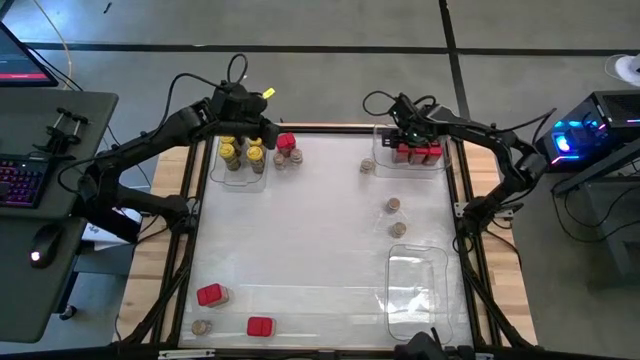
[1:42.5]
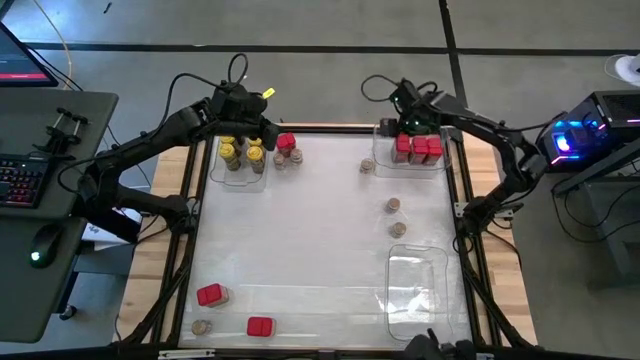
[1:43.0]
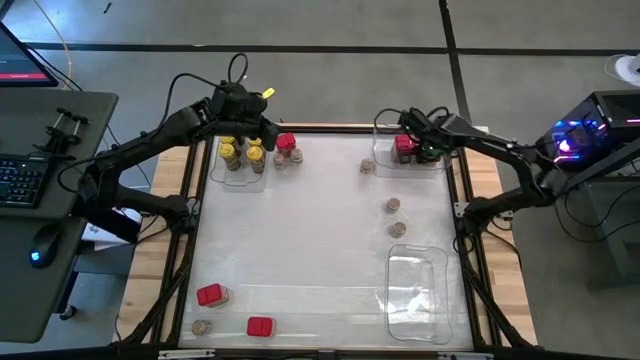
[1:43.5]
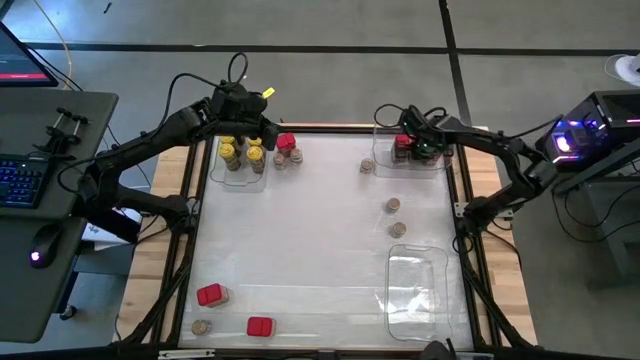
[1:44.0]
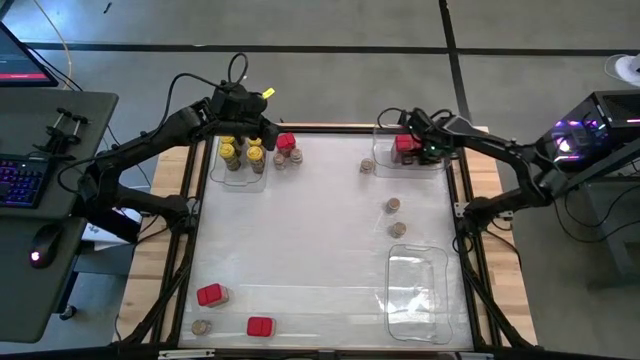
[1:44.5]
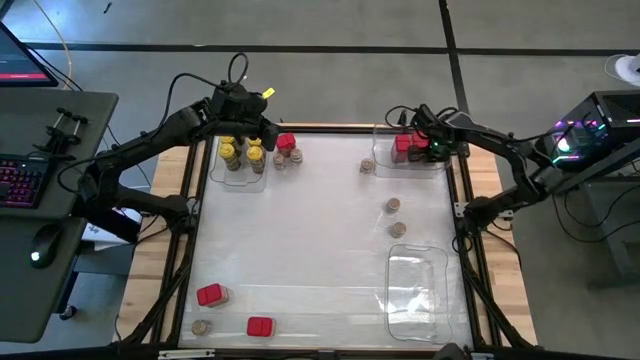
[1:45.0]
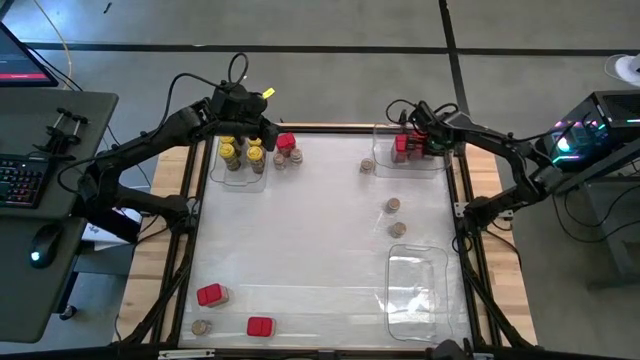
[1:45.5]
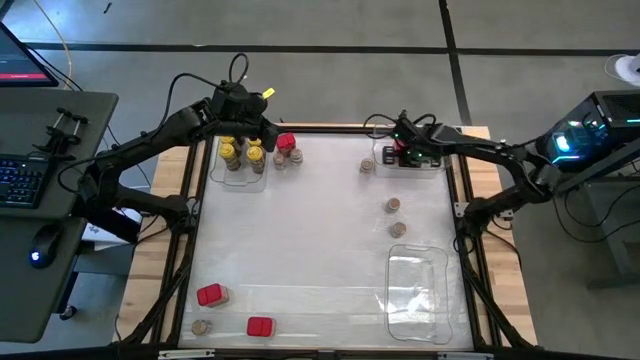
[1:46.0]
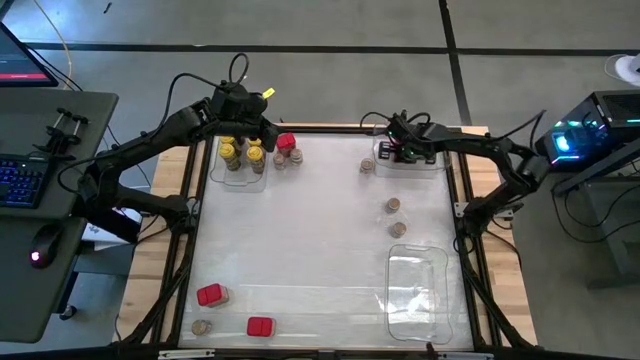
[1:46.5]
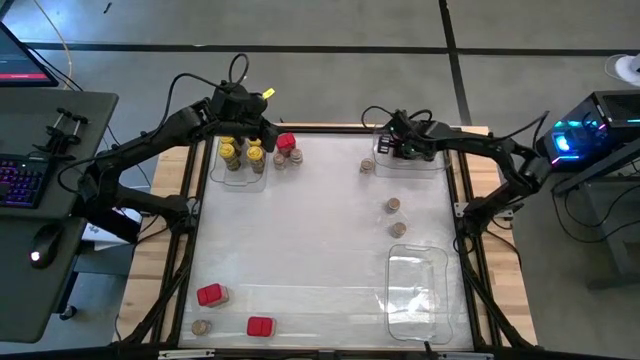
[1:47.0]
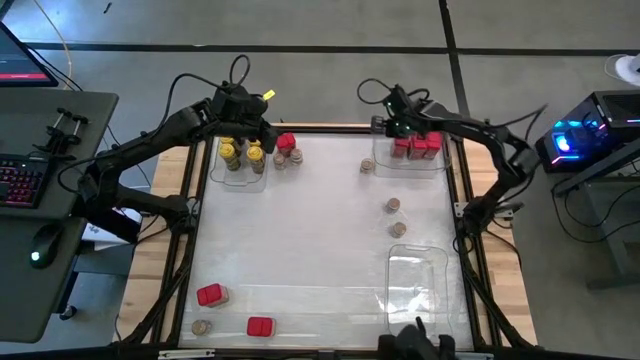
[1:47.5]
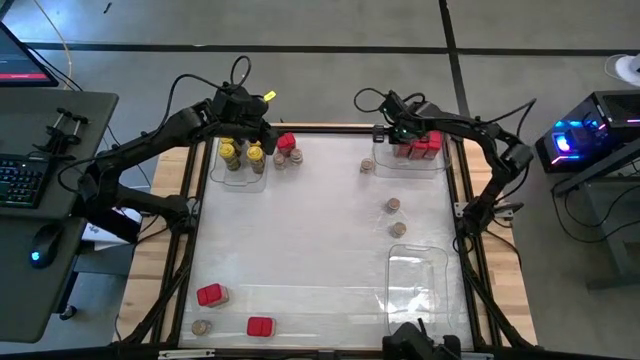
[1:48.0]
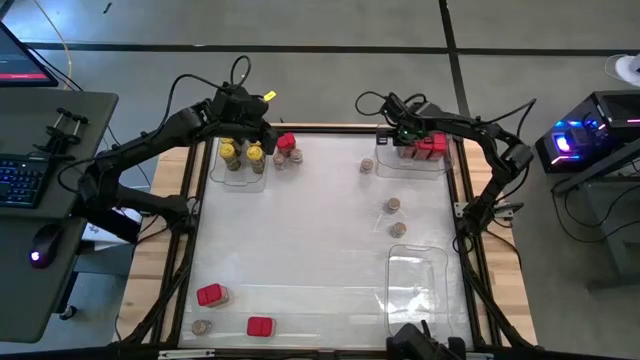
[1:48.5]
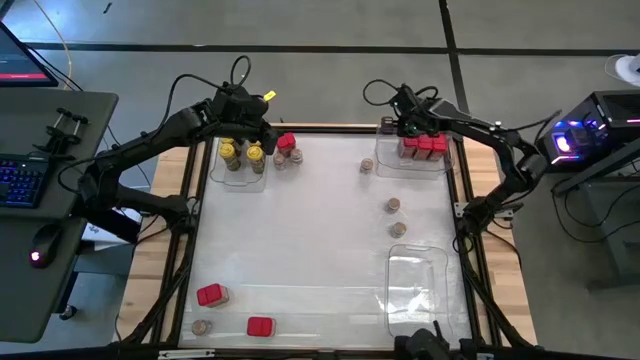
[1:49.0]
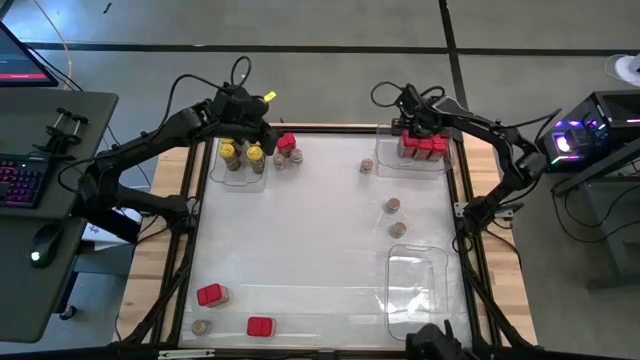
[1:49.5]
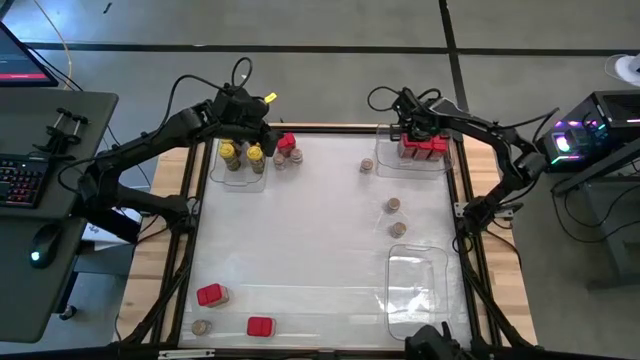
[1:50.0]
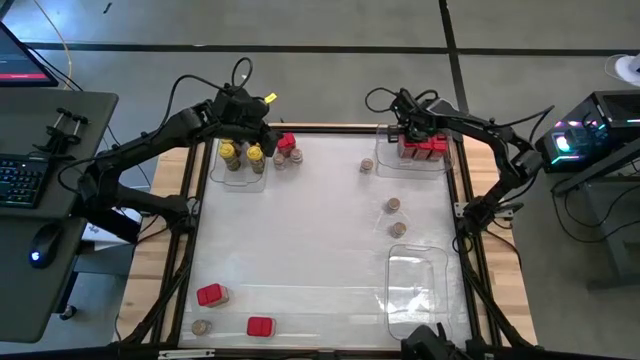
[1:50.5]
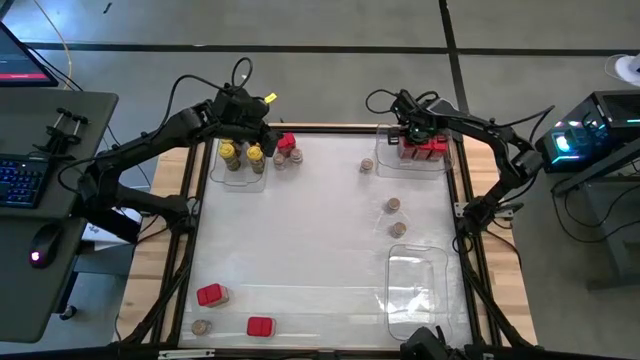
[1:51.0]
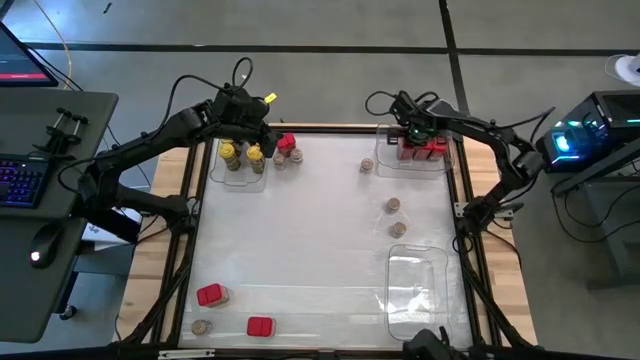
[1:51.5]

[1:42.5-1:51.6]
Task: Sort spices by type
Adjust the red seasoning cans in the top right transparent bin

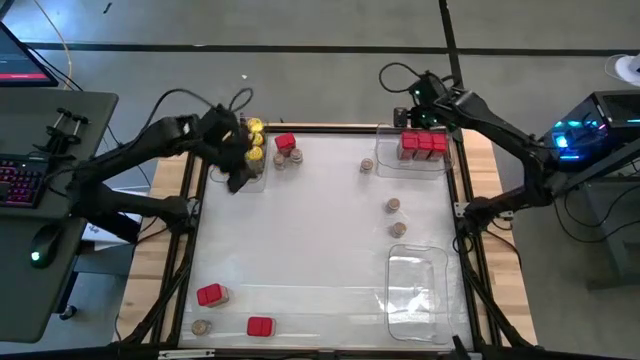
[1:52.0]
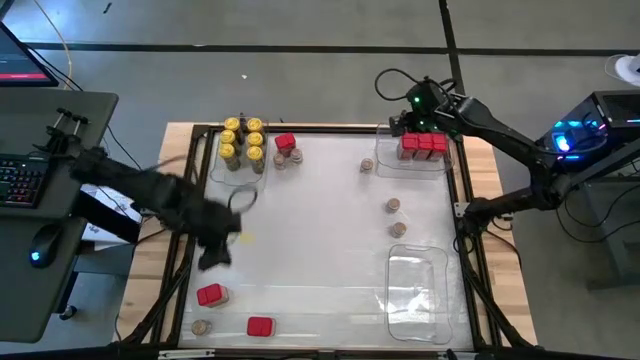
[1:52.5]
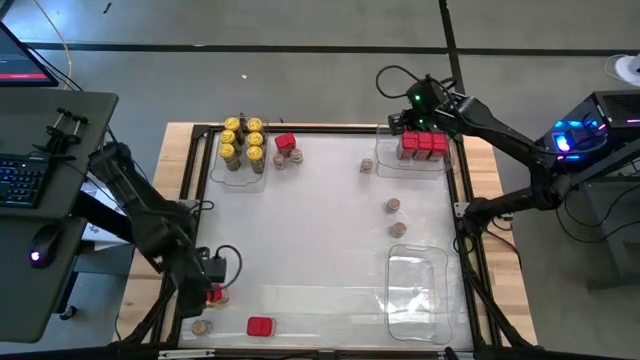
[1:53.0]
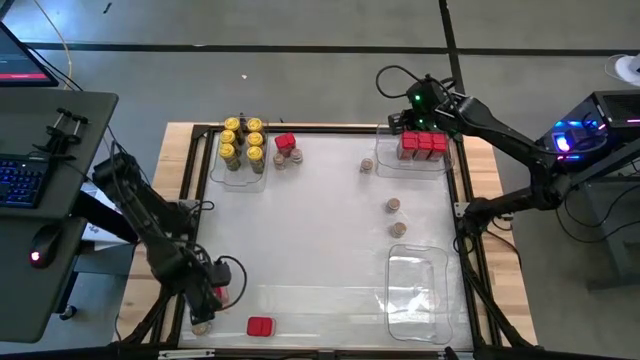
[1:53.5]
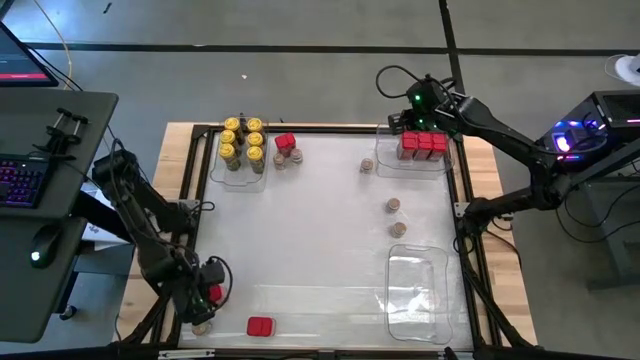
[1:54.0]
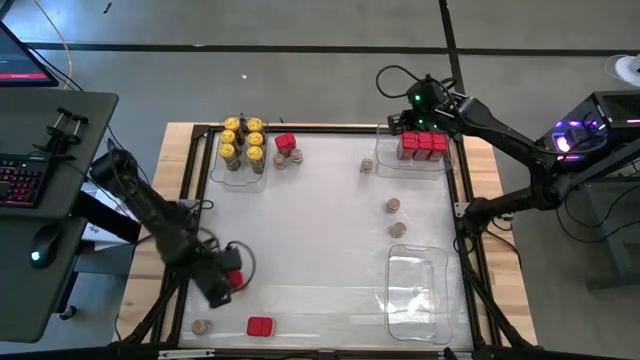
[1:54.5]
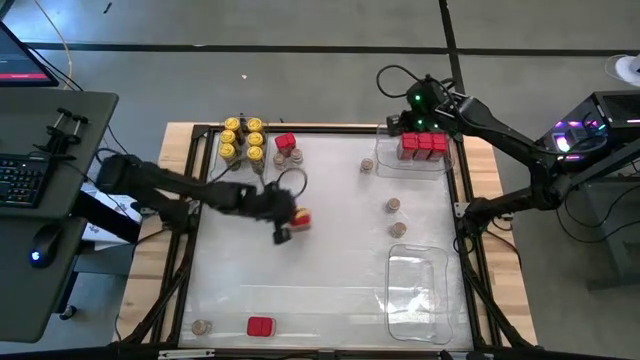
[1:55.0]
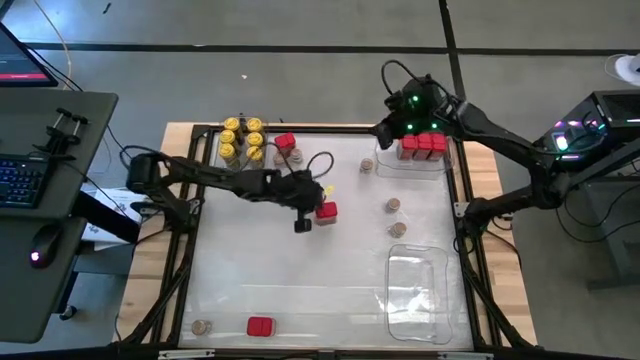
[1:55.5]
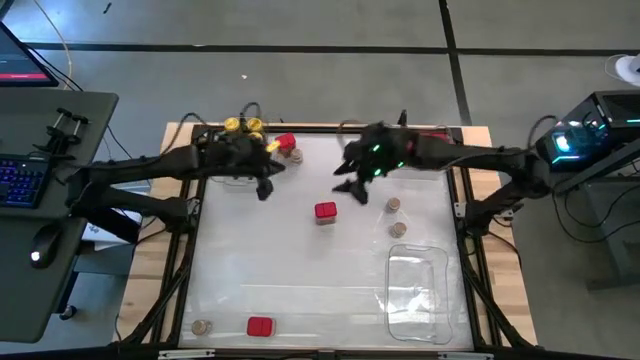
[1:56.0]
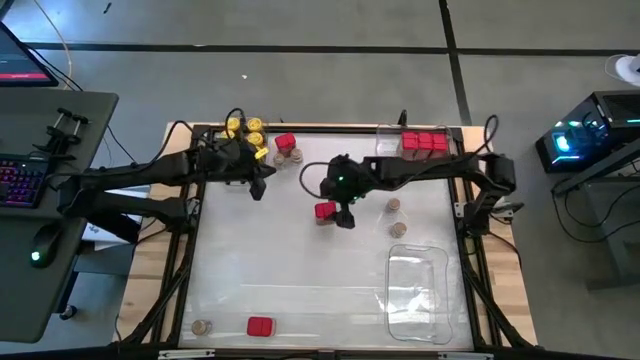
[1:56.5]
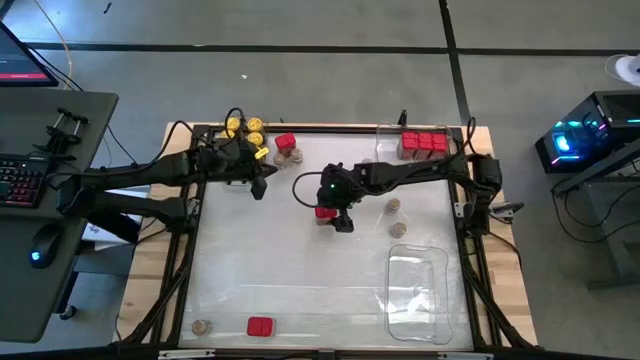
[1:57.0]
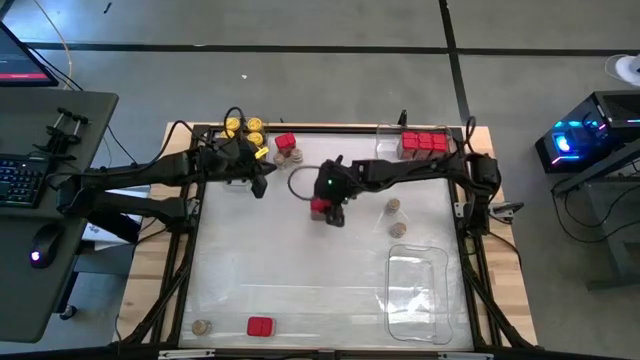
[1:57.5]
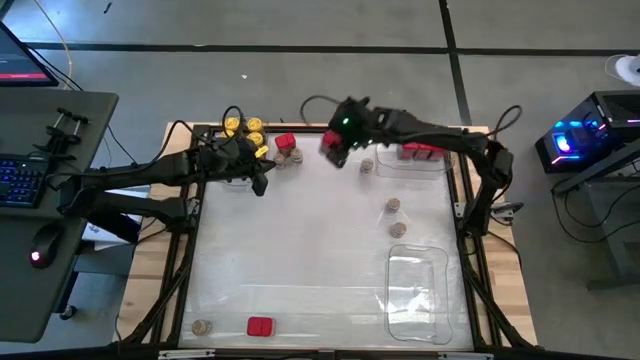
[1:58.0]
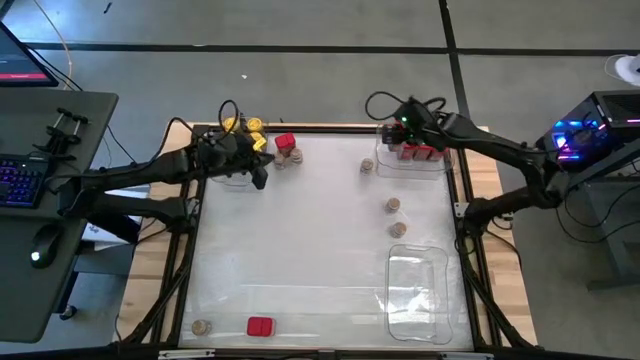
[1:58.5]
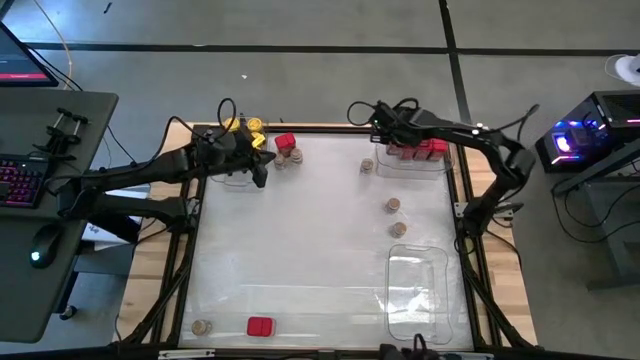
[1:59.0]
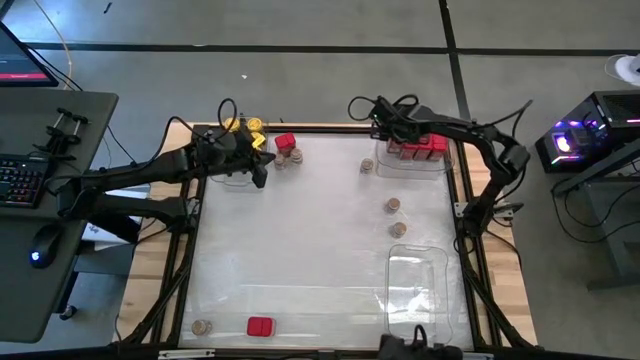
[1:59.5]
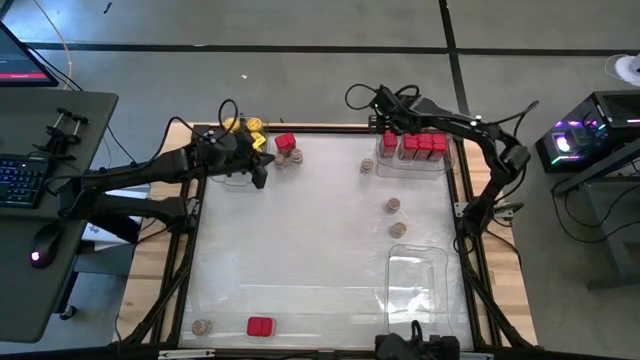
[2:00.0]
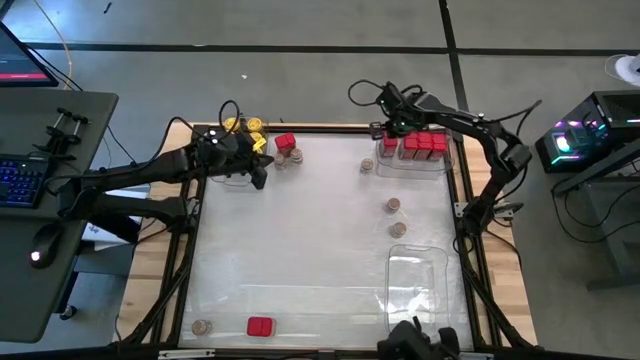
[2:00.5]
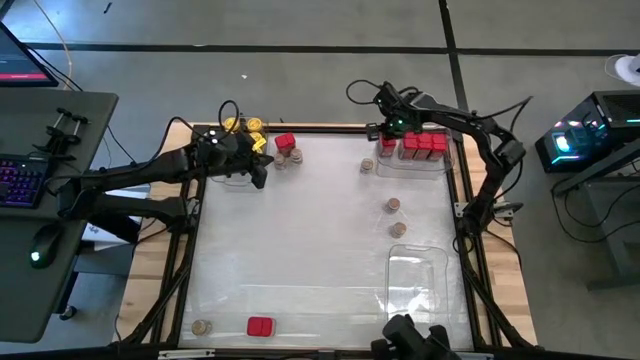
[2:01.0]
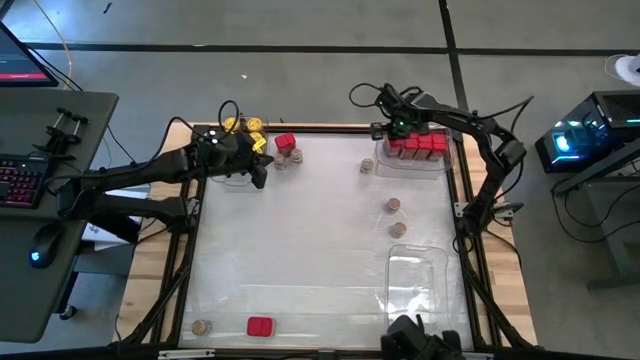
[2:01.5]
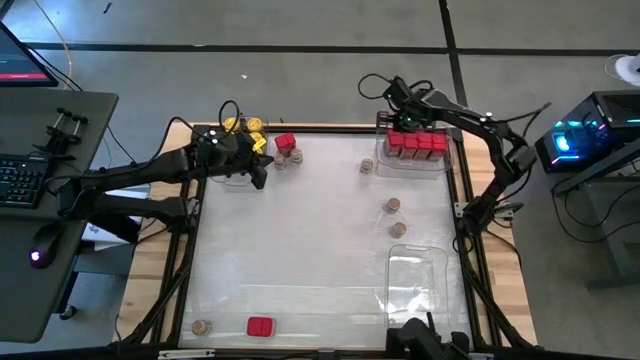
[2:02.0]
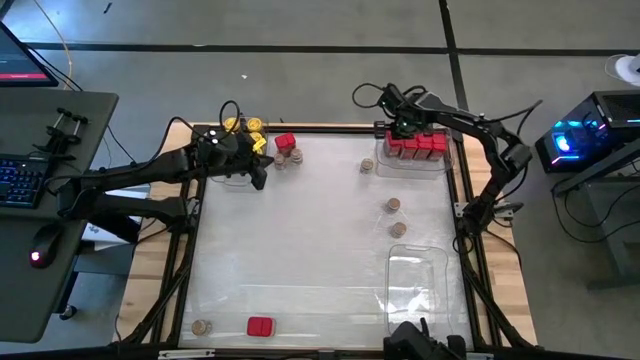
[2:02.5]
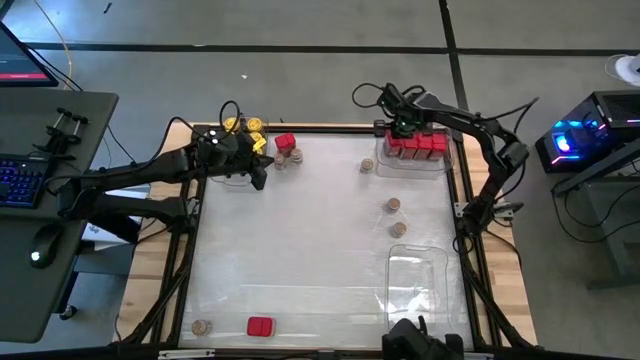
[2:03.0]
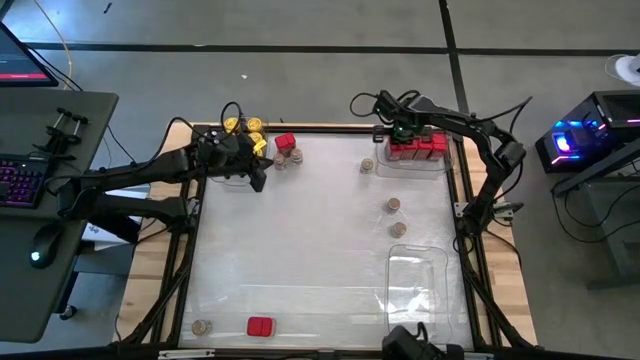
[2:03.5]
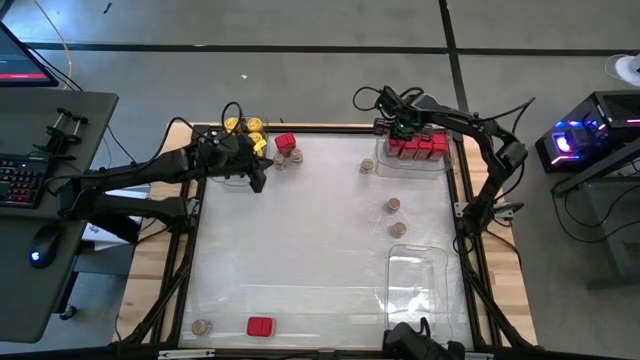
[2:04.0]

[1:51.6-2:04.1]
Put the red seasoning can into the top right transparent bin
